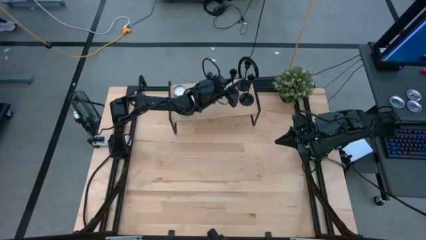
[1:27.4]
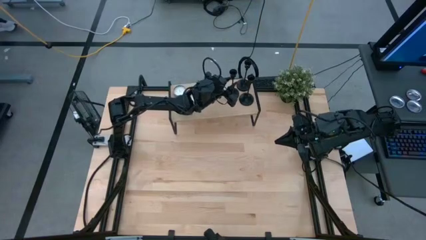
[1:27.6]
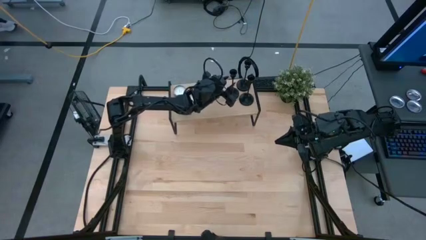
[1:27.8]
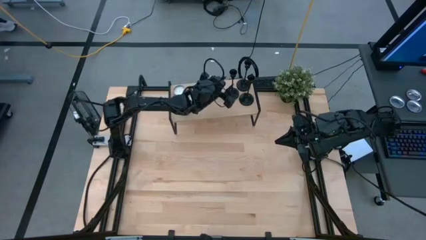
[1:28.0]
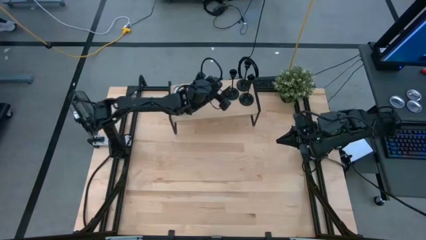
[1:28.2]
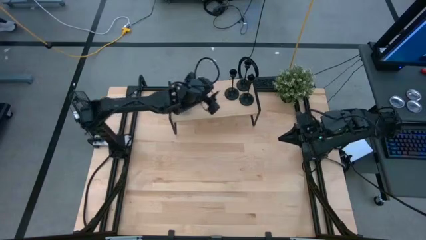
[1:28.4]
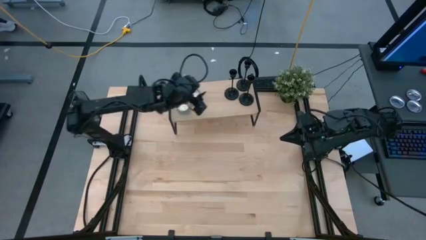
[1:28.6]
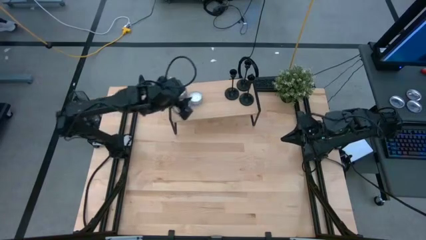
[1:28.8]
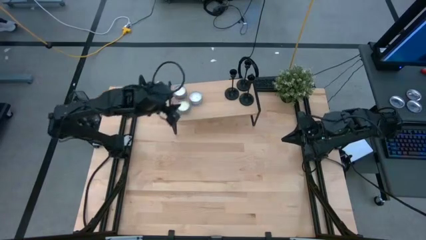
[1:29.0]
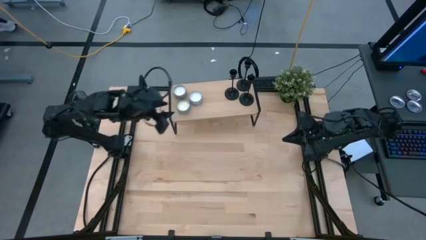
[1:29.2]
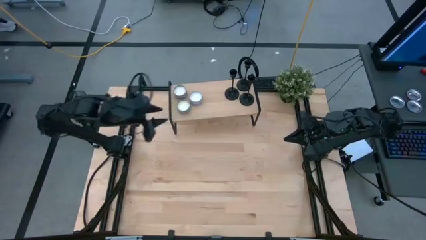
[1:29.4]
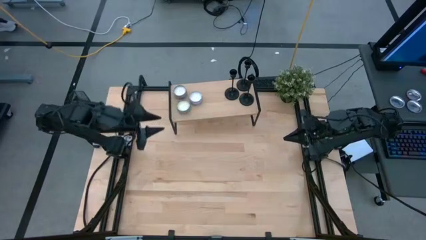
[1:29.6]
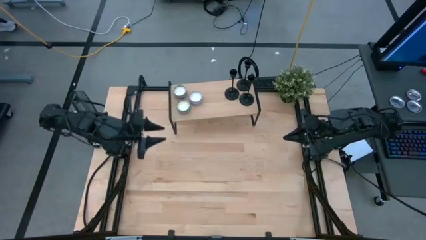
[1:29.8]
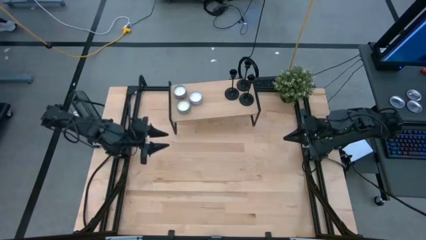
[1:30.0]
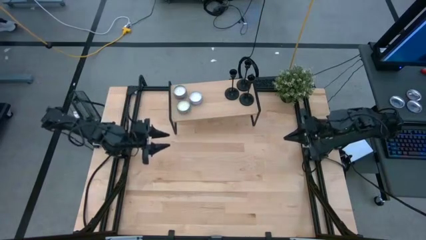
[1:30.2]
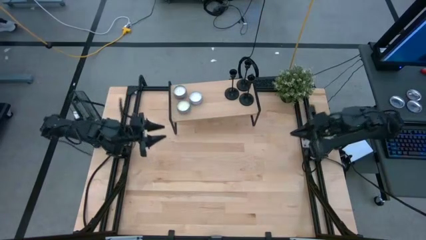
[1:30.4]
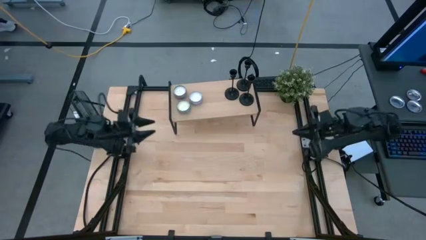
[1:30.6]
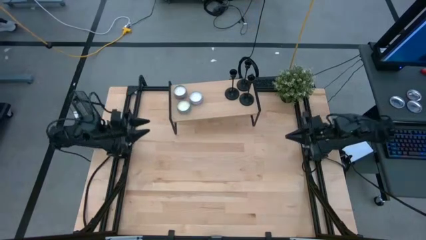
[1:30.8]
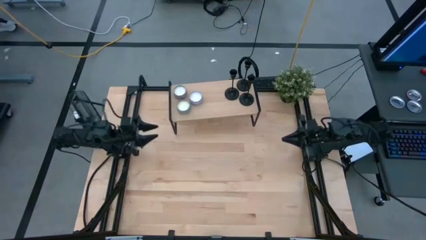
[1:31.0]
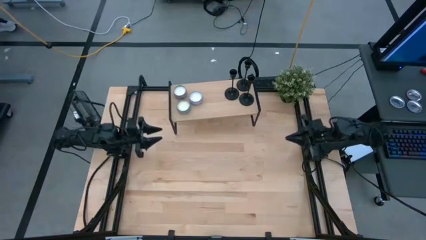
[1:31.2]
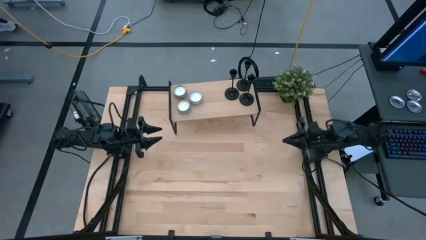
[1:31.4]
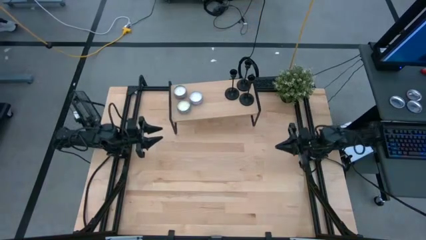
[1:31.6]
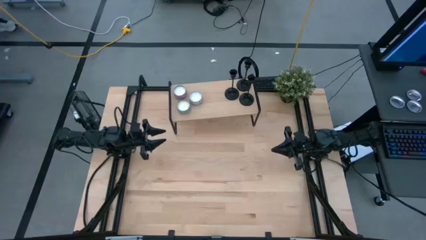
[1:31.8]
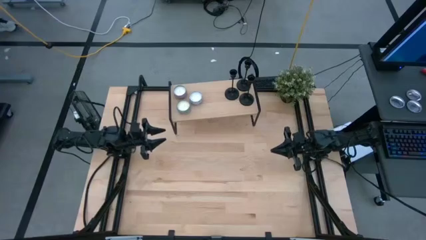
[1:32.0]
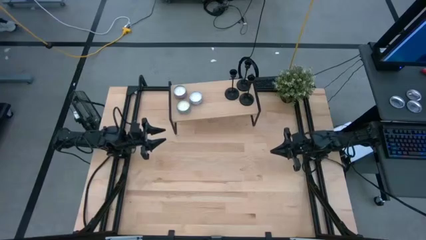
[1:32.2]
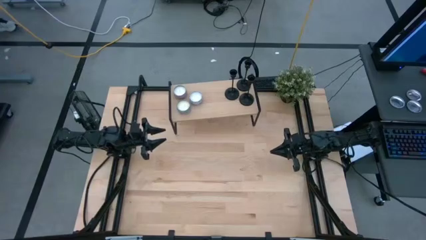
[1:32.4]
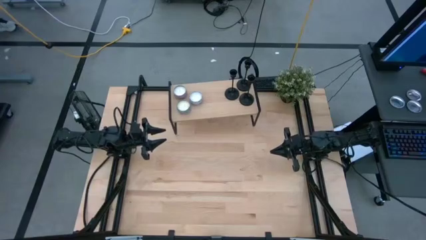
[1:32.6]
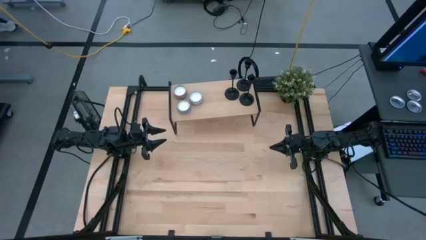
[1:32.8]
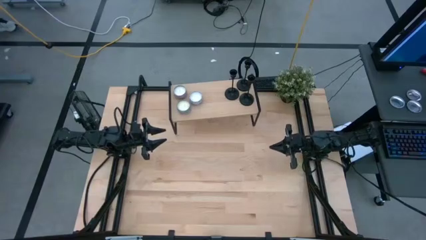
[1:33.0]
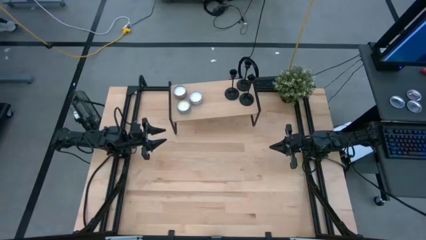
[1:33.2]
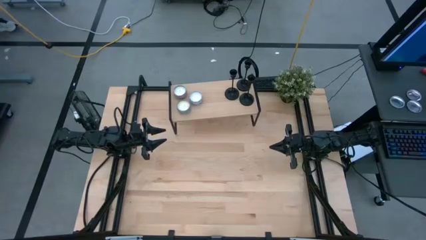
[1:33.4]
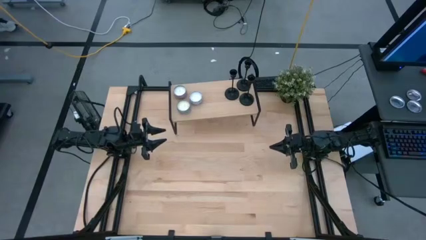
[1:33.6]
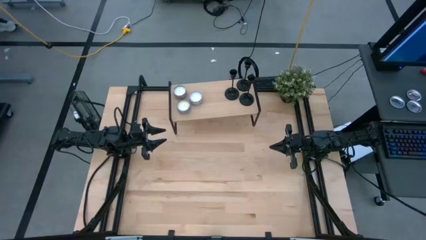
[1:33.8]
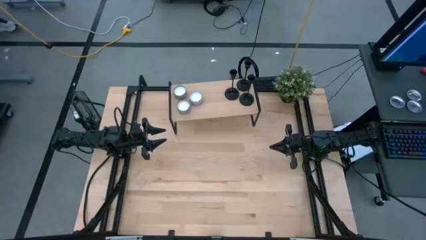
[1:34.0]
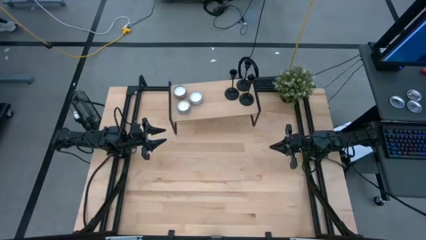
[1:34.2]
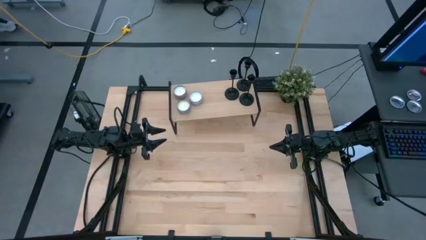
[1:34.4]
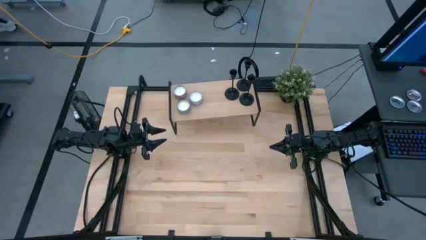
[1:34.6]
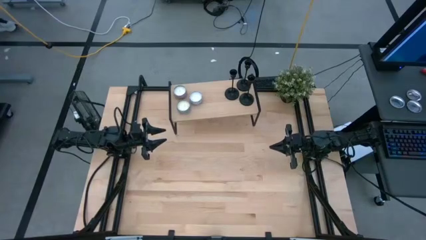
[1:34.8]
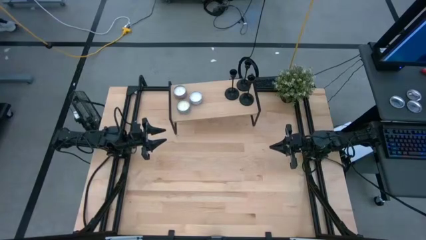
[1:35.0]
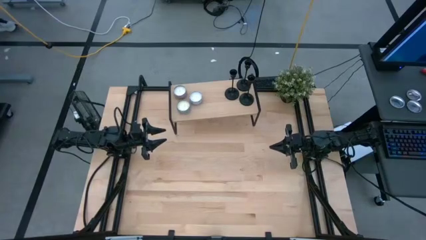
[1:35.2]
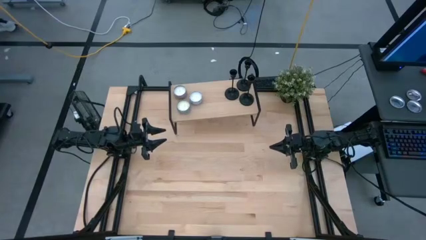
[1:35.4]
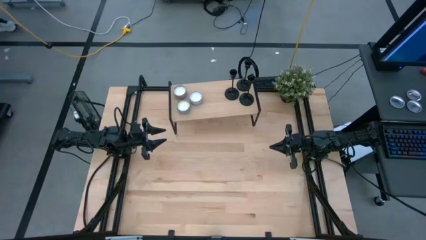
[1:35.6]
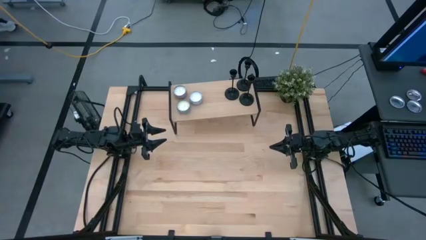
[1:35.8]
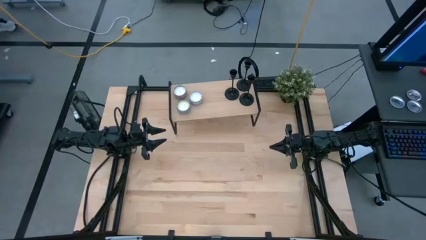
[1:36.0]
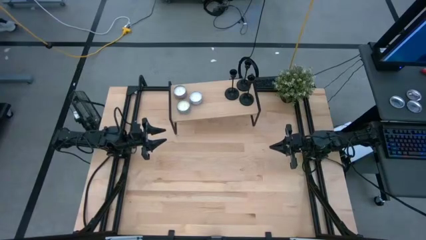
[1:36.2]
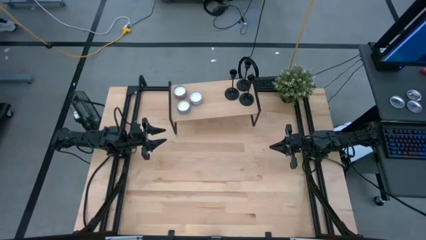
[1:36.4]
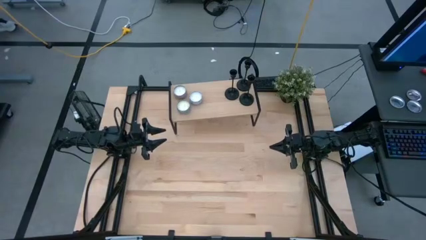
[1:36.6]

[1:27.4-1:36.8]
Task: Pick & Place candle stick holders
Return to Home Position

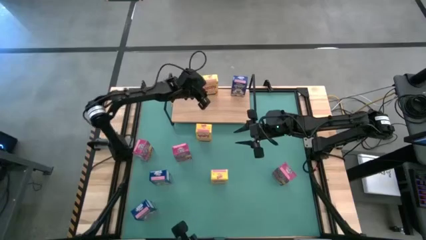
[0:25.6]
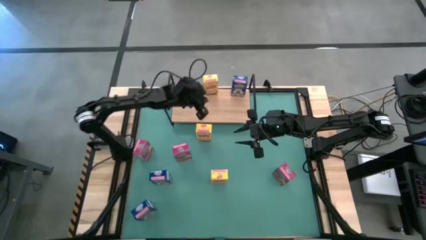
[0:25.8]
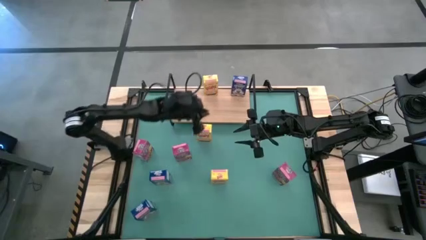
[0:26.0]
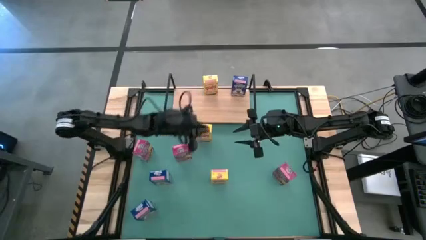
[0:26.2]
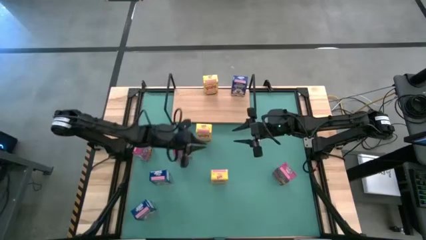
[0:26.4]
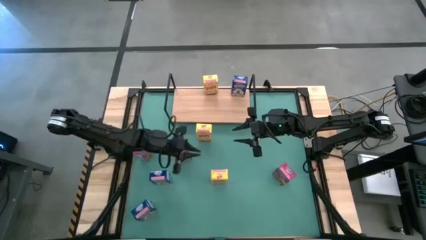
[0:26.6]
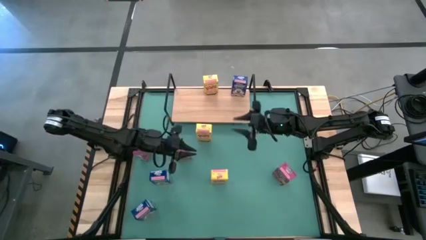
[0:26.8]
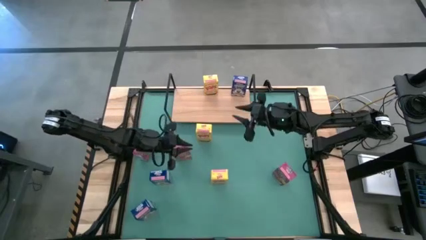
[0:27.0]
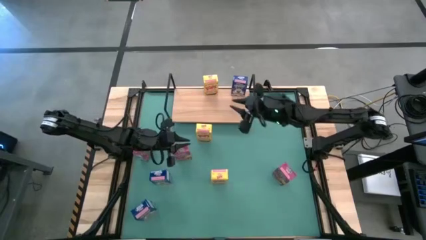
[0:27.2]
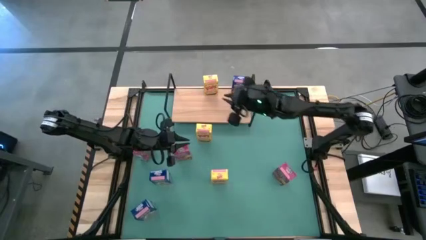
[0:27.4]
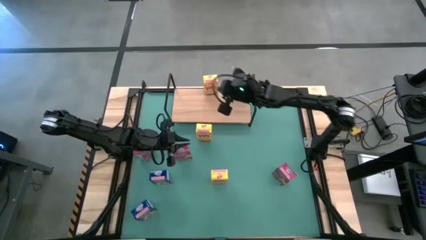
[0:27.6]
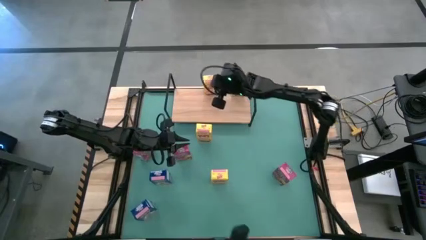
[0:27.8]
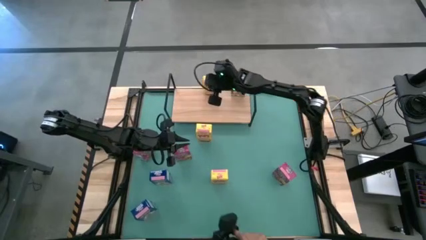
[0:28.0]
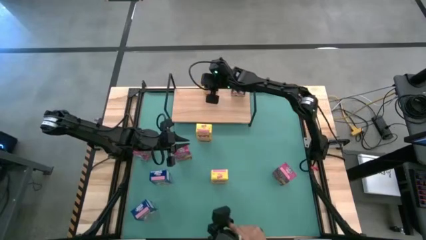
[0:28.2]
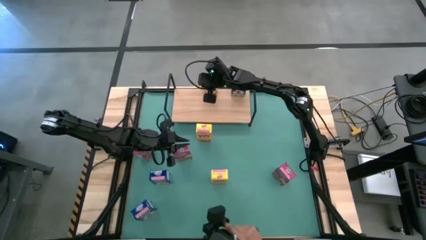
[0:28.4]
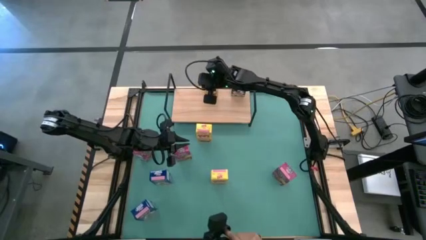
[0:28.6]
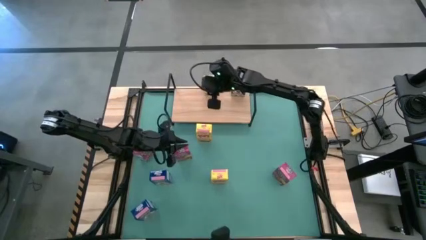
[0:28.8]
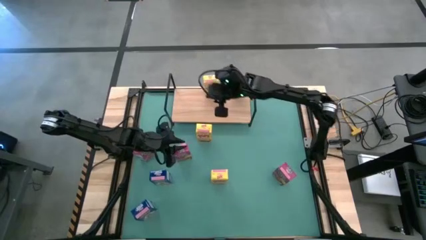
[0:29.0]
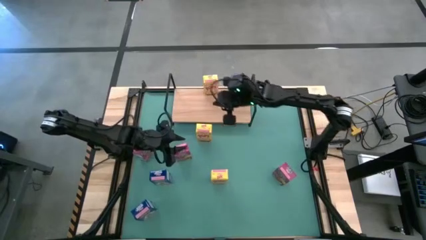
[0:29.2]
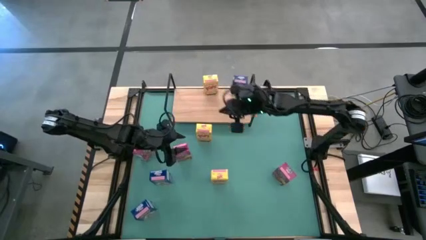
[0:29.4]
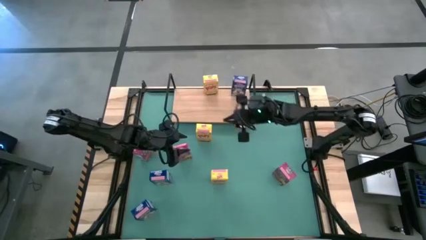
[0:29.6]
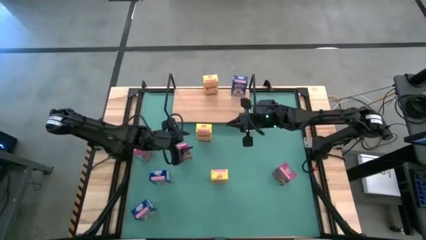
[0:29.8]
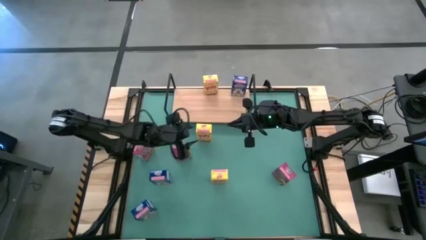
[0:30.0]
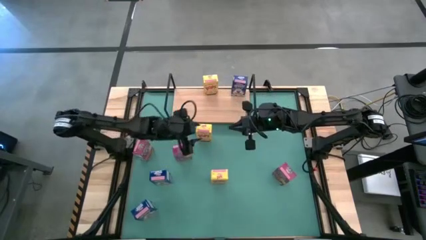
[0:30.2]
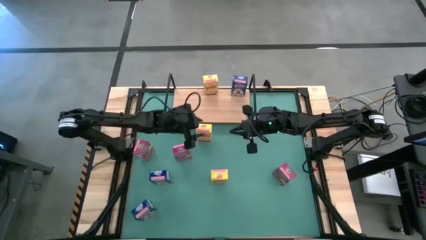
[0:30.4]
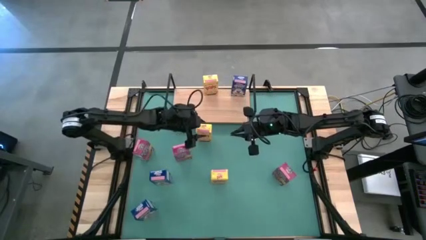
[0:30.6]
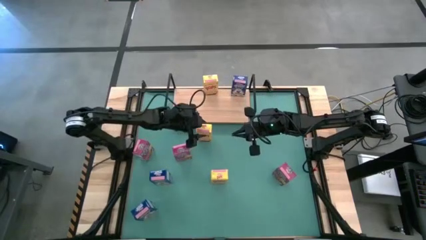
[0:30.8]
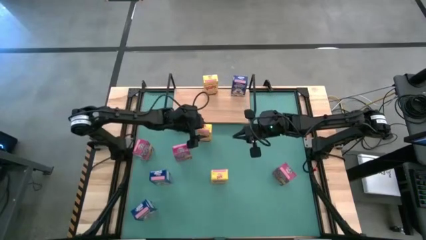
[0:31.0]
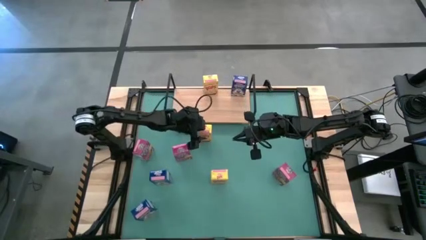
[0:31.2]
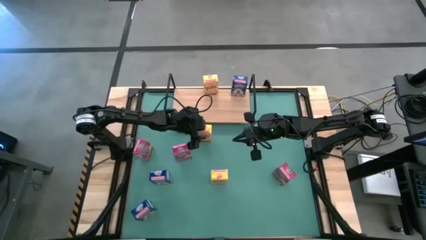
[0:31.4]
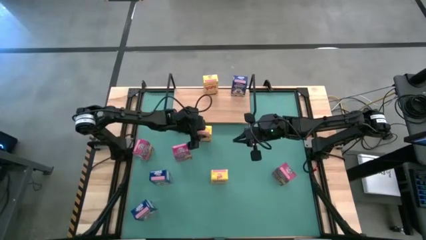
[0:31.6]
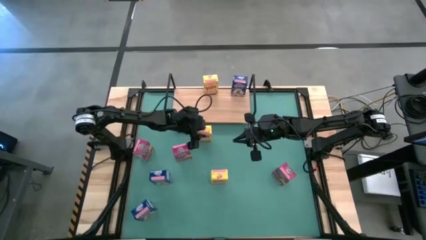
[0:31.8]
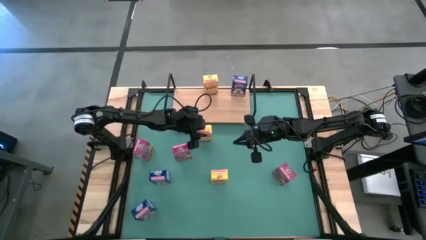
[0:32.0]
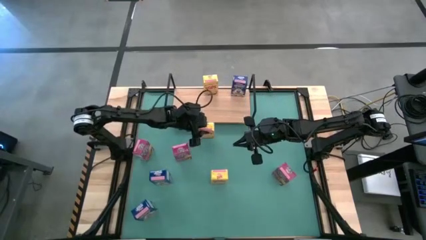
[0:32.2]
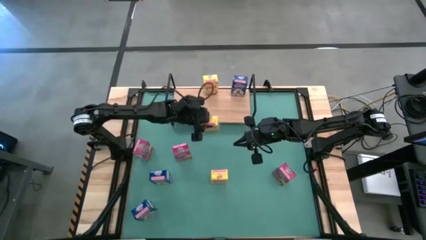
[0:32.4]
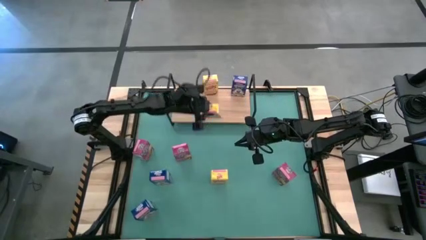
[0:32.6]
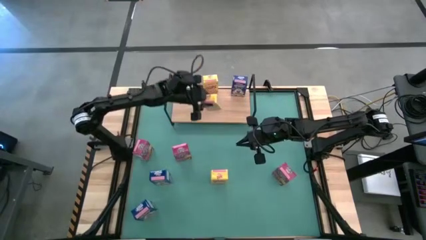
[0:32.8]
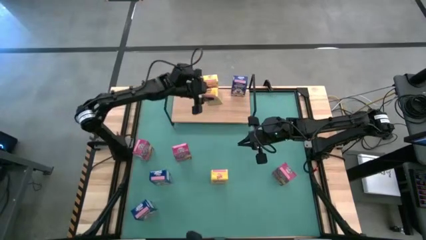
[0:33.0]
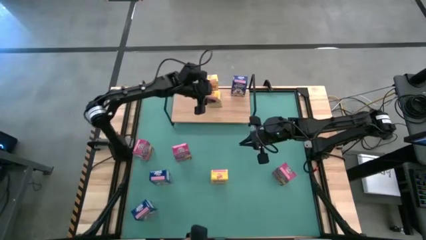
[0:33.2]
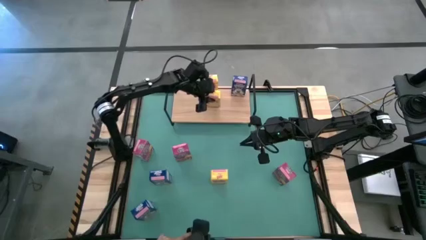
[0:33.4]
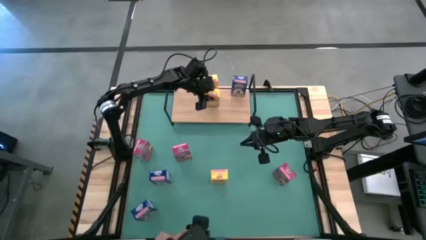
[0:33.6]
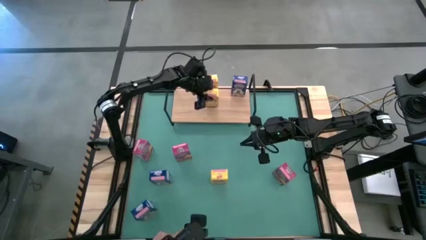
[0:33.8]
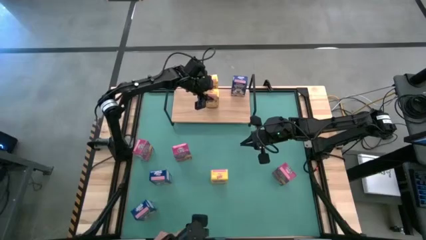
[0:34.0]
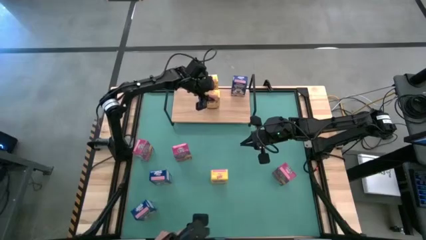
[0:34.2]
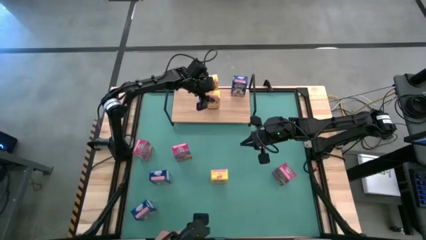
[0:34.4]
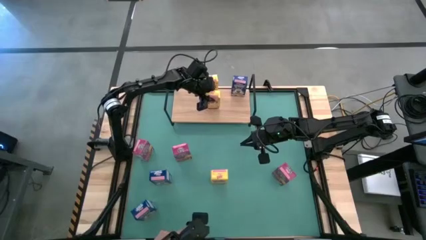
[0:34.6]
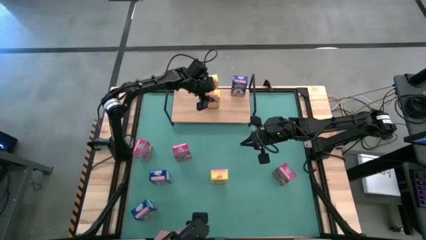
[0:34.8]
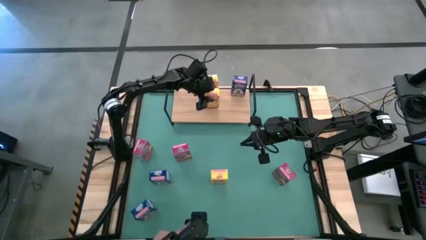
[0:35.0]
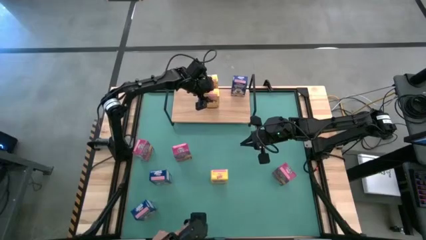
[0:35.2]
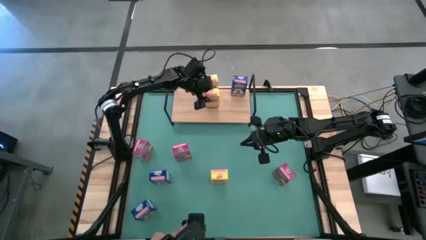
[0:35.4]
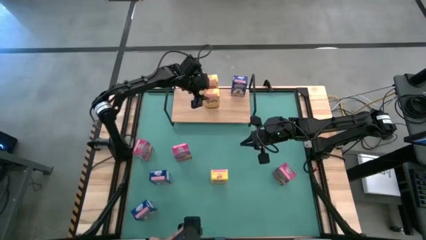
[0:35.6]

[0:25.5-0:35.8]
Task: Stack cereal on shelf
Put the top yellow cereal box on the shelf aligned with the other yellow cereal box
